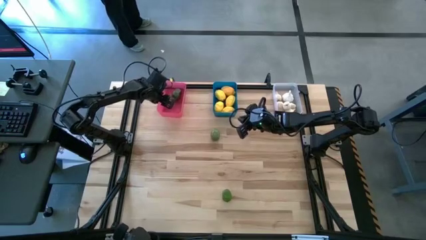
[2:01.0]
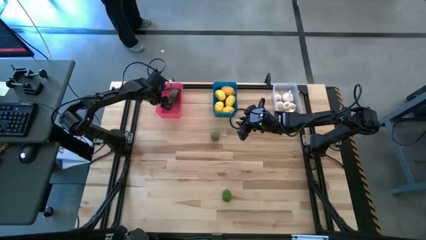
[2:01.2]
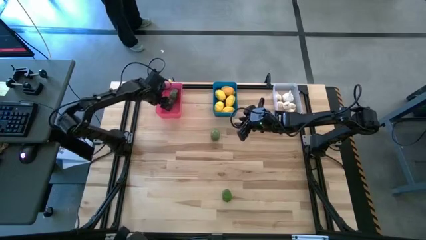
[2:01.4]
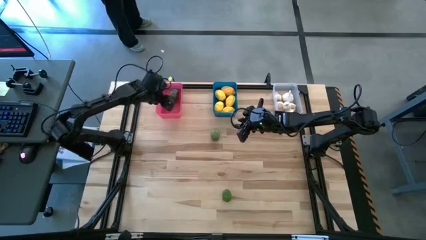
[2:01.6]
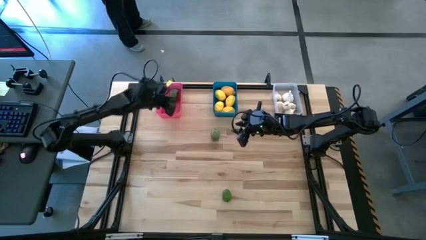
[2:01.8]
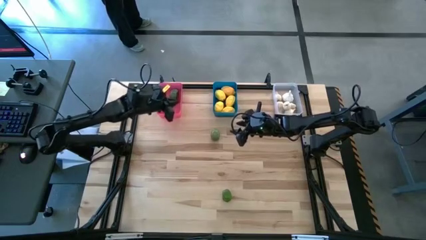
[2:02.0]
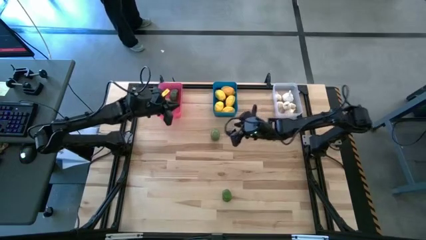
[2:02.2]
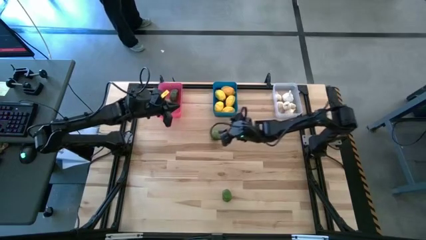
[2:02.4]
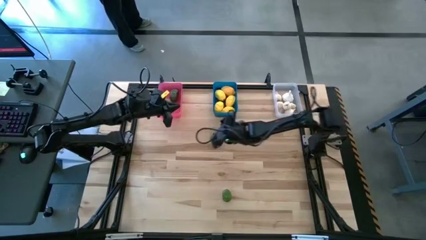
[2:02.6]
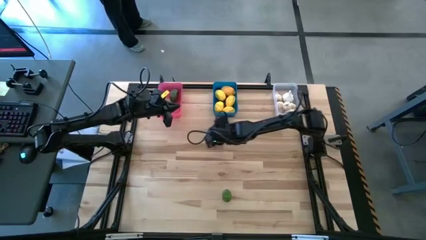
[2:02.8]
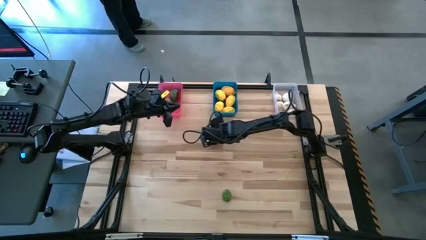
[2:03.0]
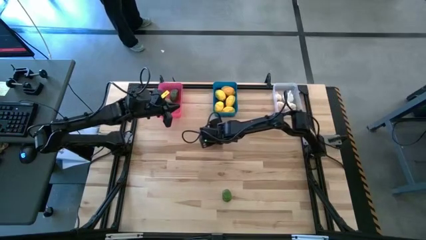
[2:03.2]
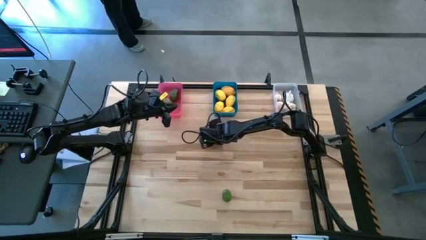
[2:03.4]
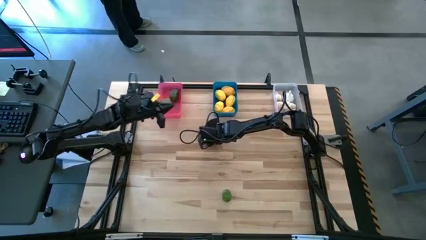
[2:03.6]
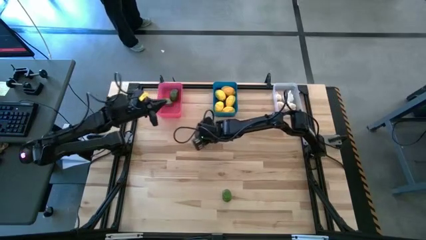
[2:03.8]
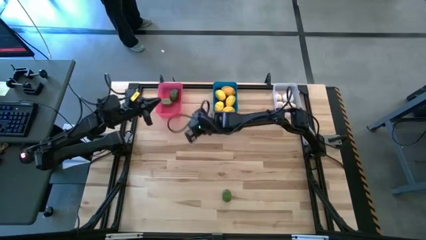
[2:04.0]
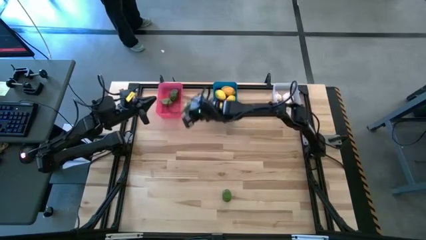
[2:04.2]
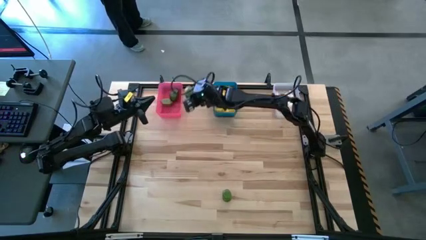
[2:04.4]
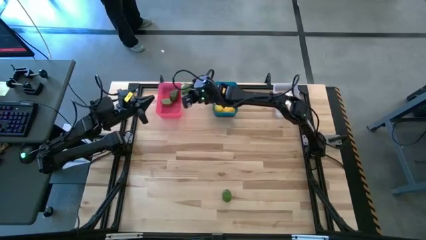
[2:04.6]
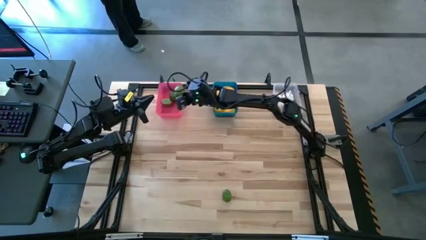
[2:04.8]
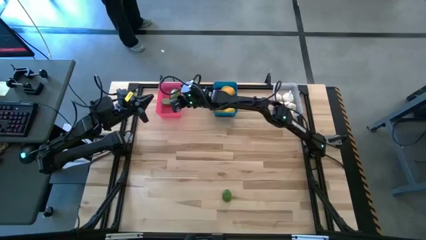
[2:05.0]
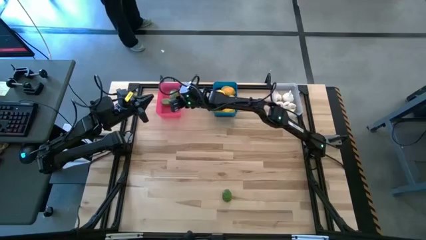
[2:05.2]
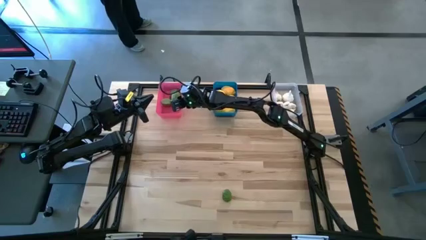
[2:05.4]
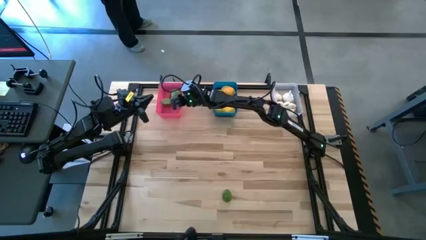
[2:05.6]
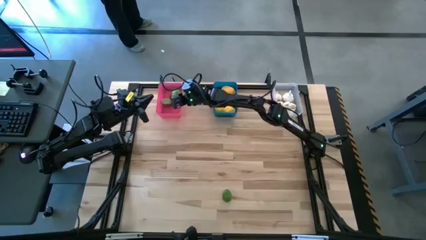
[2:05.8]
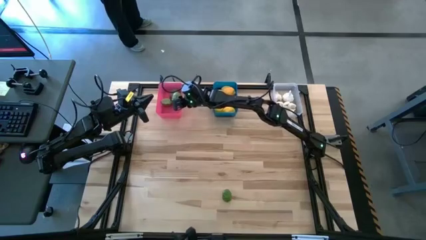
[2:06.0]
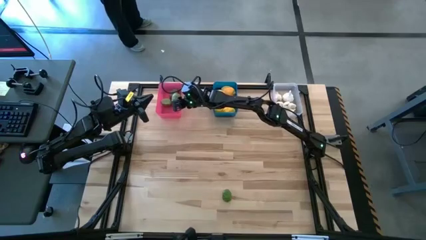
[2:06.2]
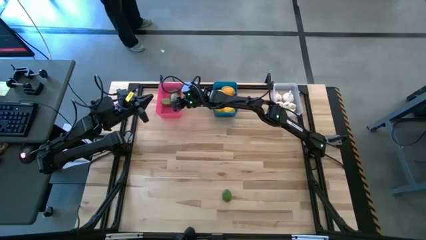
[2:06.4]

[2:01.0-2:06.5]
Task: Sort produce into baskets
Put the lime into the red bin

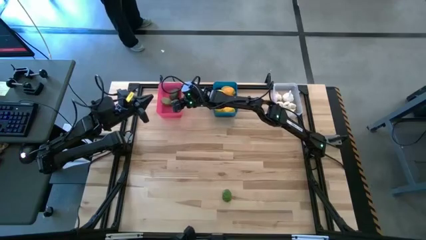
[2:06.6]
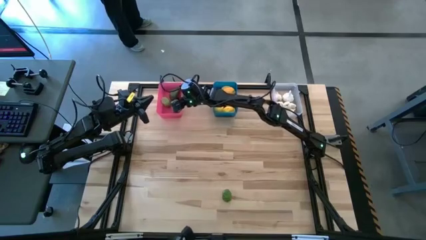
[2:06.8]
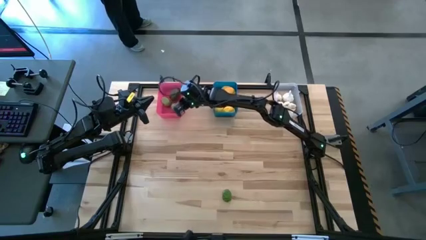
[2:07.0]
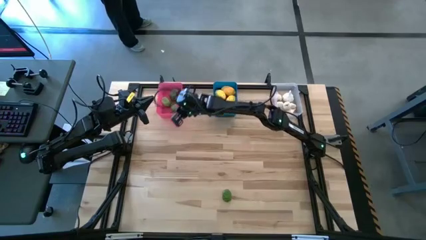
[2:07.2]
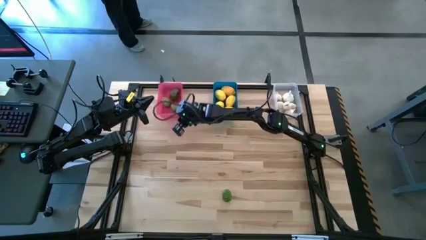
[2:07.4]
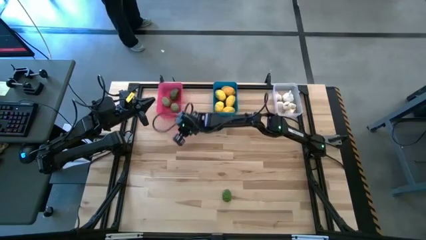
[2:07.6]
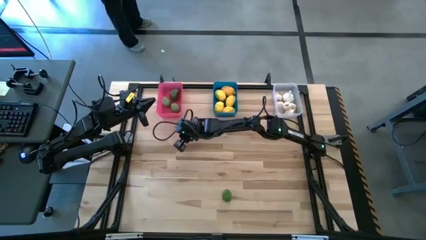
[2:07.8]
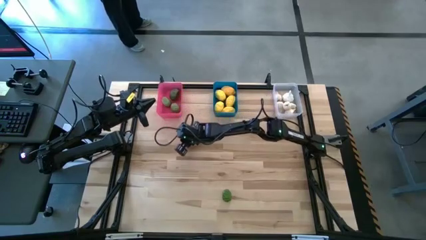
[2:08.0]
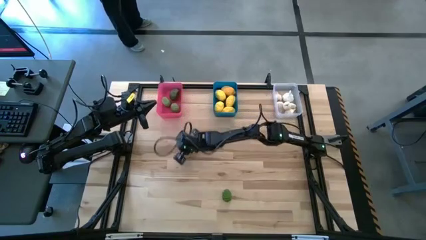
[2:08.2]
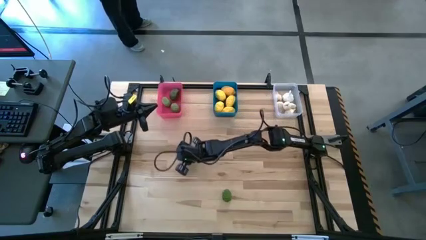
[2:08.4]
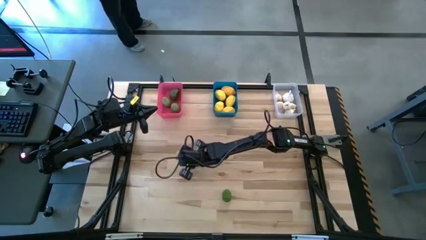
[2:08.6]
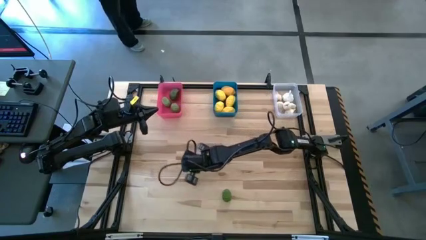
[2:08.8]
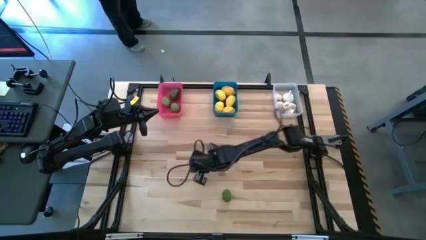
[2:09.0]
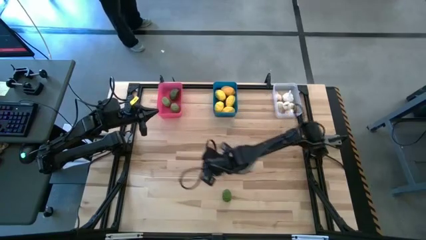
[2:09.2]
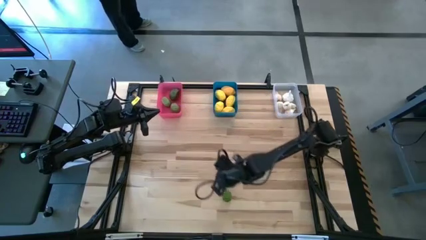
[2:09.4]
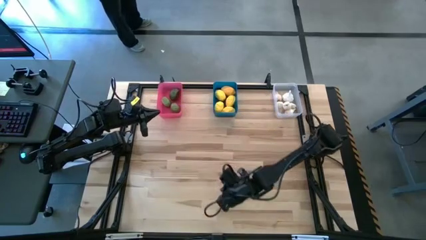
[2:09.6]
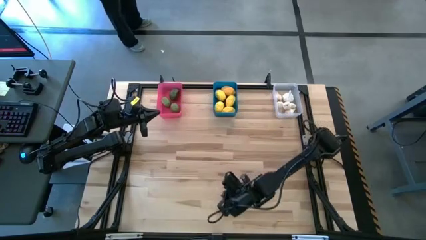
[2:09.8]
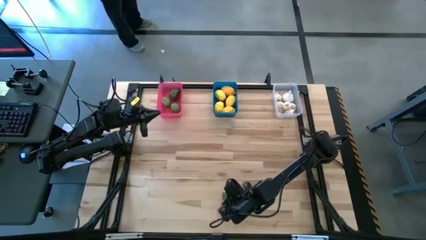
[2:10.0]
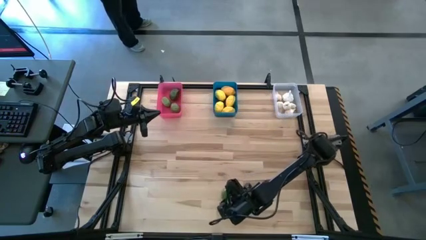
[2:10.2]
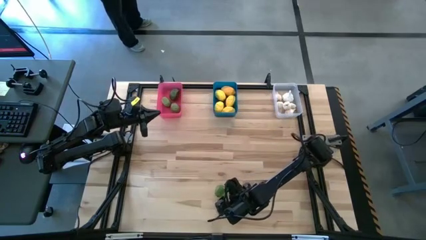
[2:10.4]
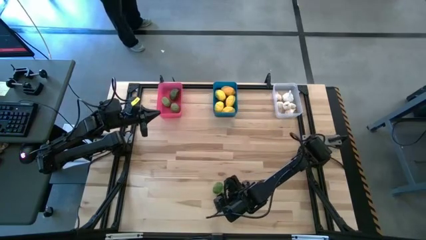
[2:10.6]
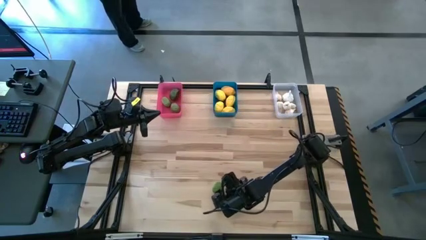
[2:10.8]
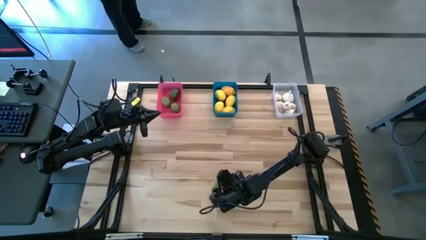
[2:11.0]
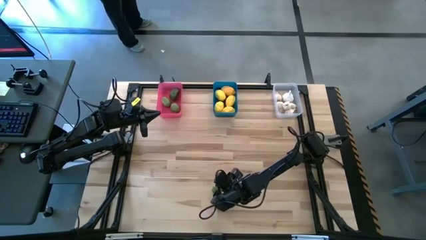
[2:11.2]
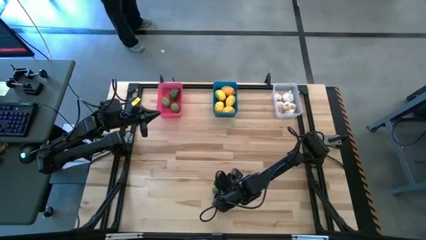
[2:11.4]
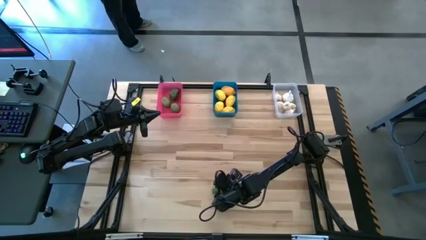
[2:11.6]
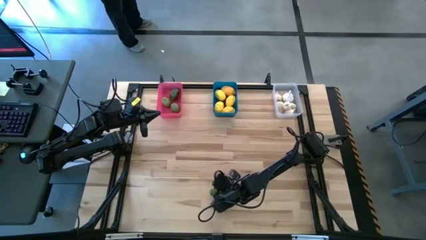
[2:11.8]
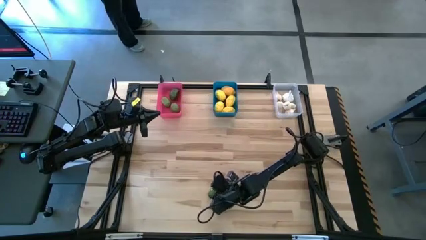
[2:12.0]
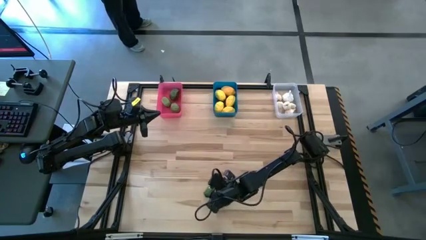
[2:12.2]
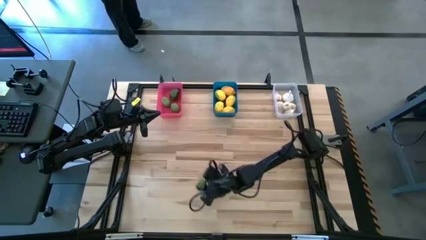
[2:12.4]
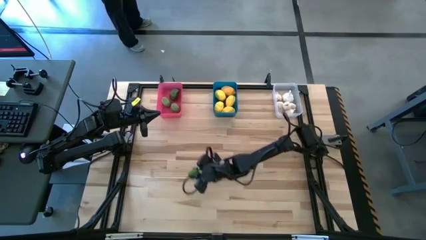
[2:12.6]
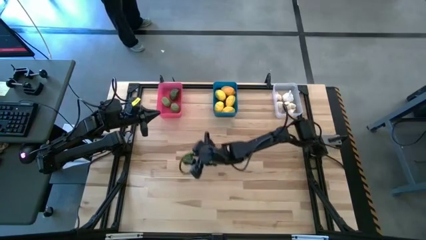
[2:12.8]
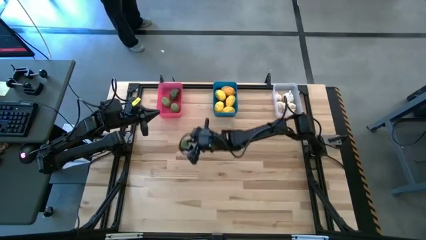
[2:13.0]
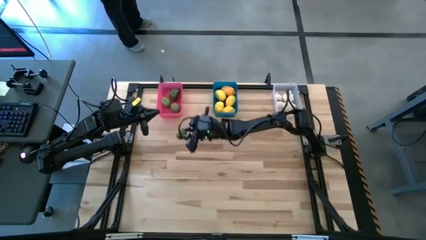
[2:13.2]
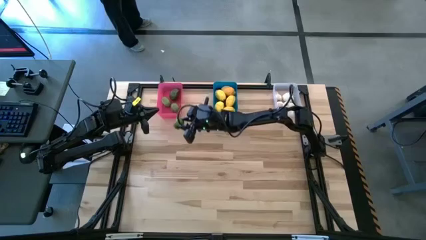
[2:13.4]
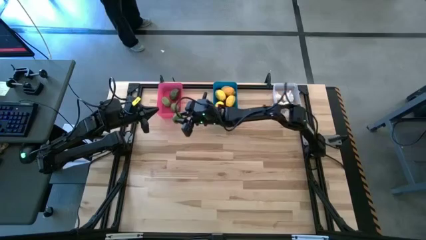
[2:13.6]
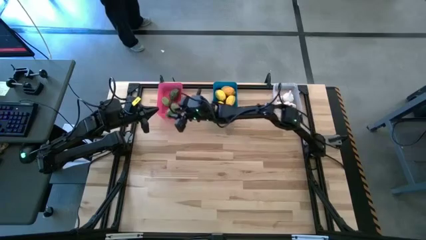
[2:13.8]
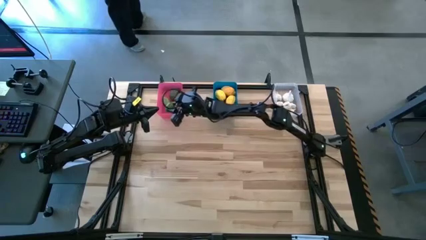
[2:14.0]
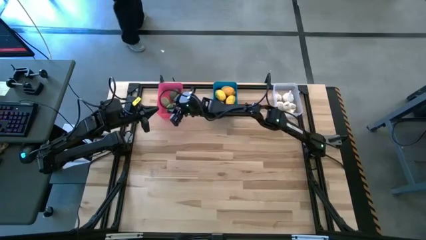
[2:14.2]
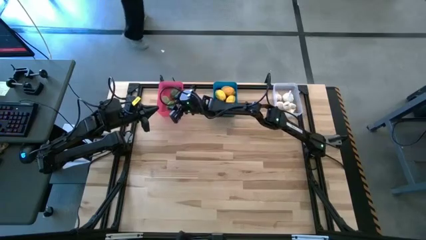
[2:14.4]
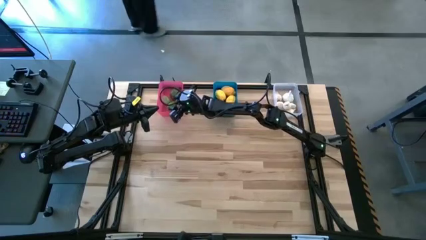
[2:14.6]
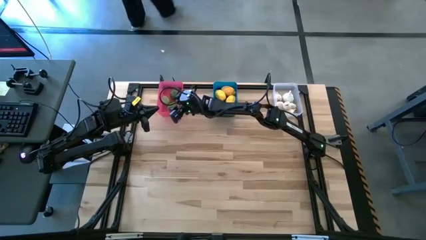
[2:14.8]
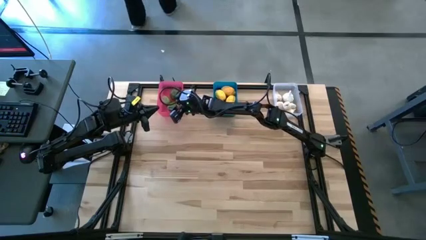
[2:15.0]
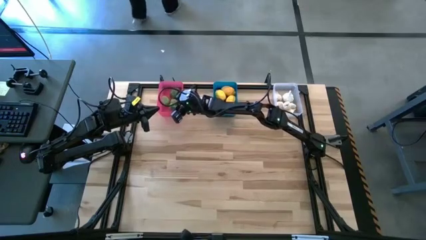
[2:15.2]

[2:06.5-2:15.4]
Put the lime into the red bin

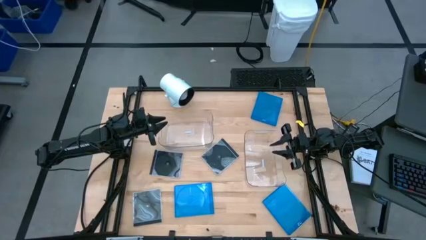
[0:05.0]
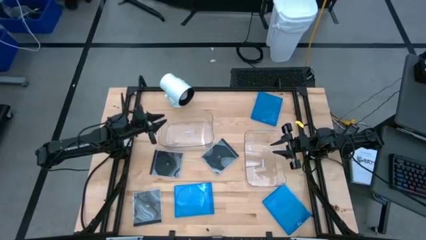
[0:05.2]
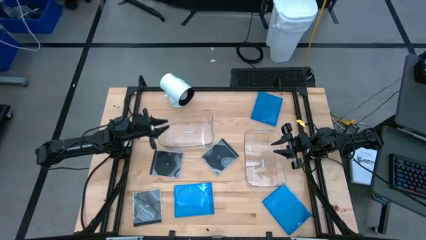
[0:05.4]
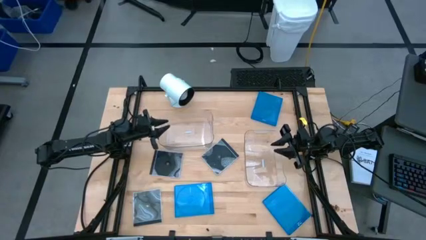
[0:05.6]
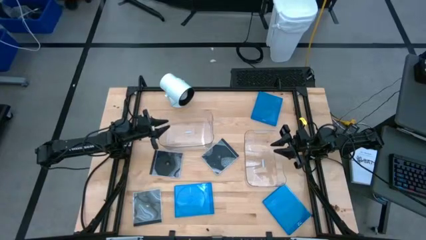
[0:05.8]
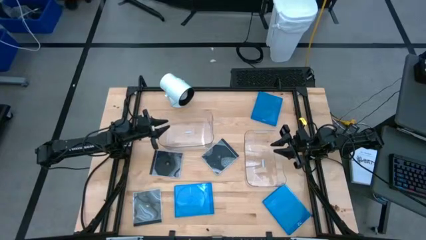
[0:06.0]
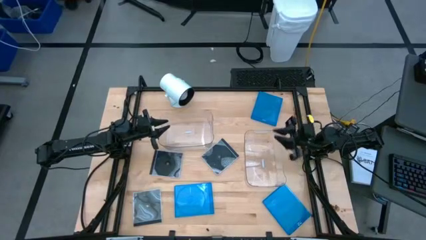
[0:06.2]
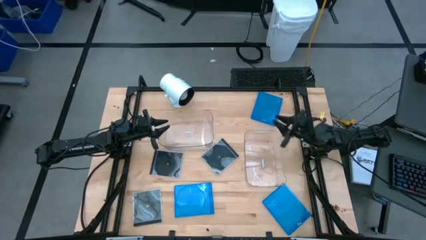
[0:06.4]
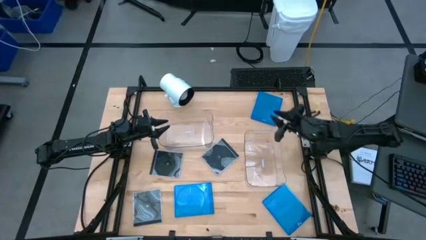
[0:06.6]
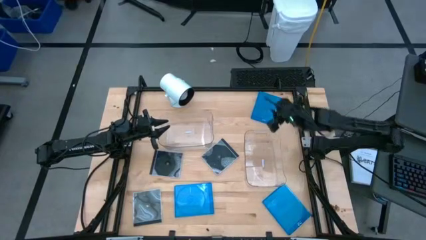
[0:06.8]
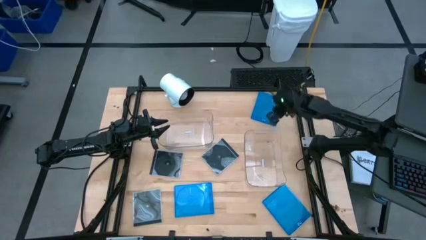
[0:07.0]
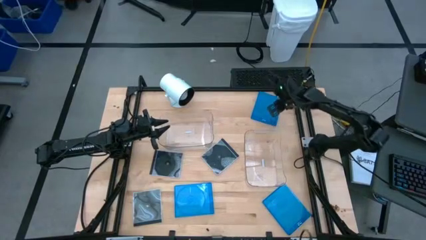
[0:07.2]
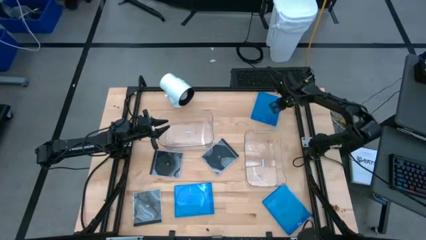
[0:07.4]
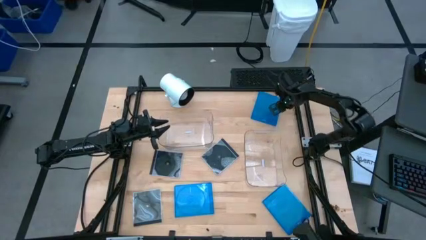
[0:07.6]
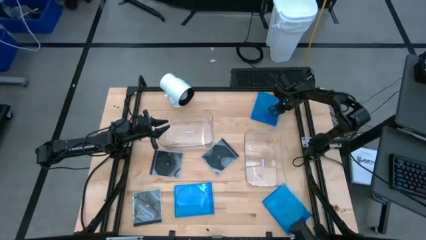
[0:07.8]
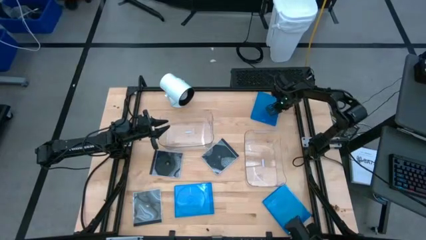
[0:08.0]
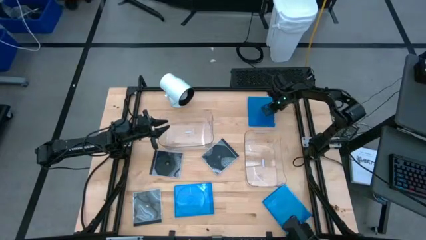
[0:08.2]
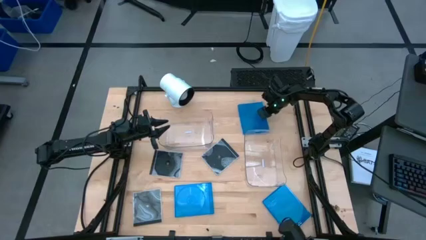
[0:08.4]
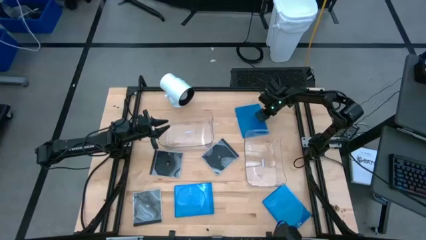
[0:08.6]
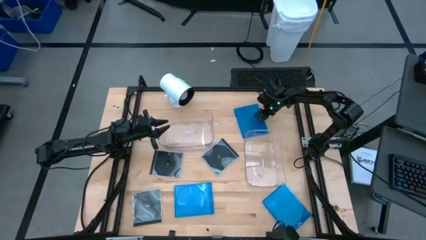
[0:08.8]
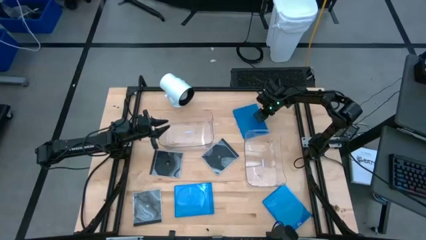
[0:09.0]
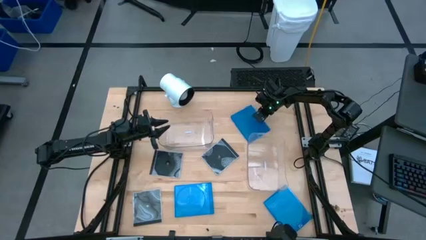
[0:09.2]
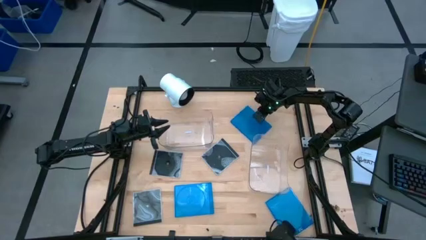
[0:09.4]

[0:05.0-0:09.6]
Task: Pick & place jewel cases by type
Put the top blue cd case into the right transparent bin
